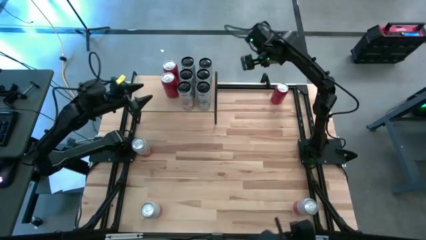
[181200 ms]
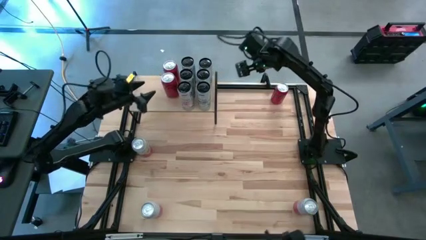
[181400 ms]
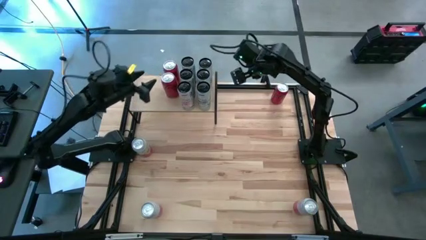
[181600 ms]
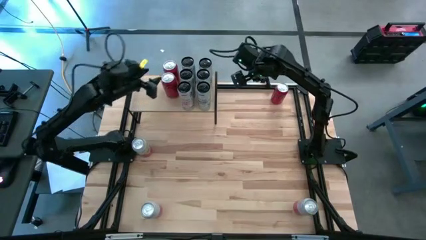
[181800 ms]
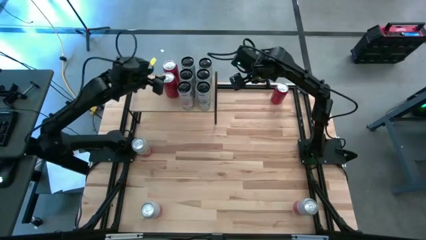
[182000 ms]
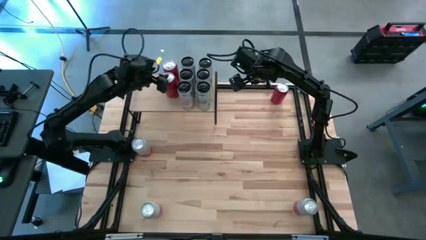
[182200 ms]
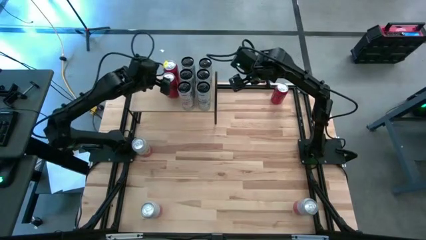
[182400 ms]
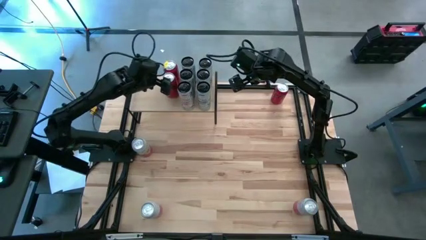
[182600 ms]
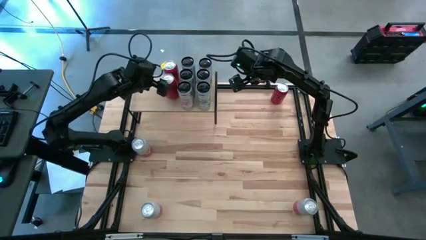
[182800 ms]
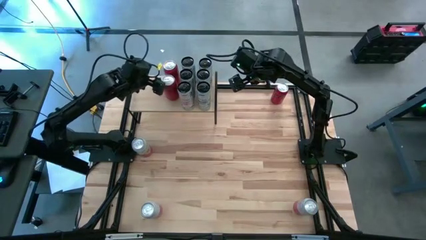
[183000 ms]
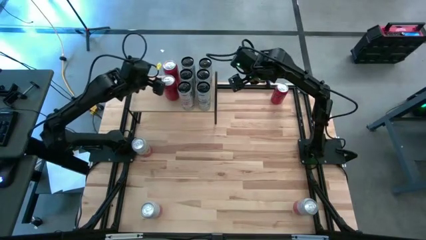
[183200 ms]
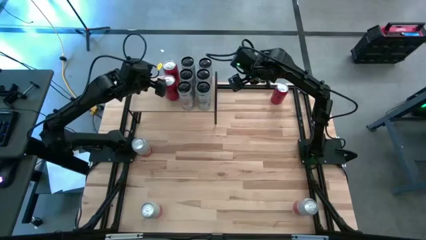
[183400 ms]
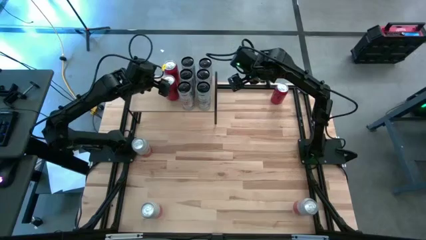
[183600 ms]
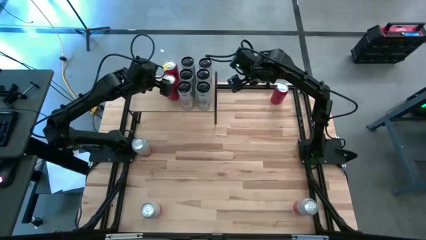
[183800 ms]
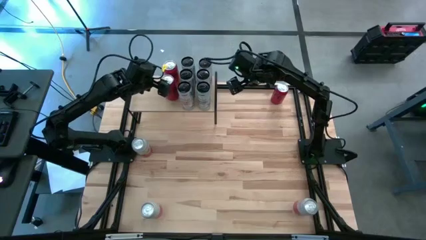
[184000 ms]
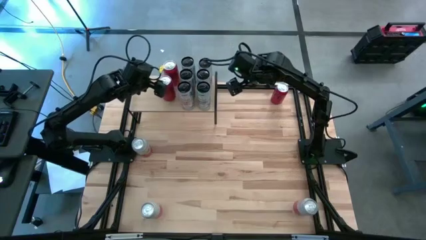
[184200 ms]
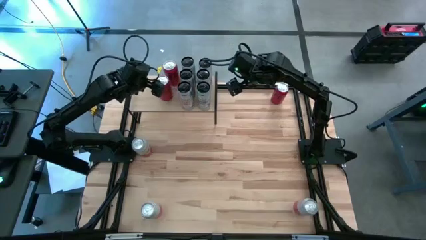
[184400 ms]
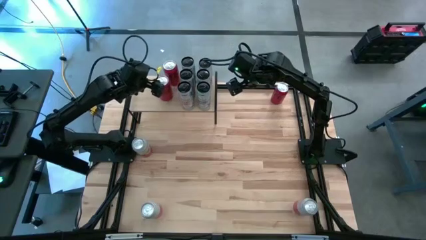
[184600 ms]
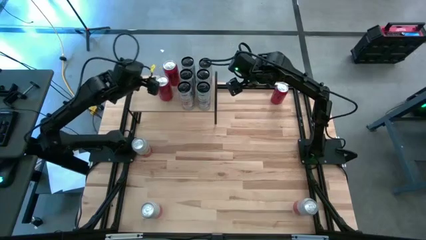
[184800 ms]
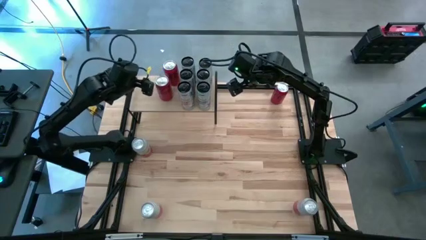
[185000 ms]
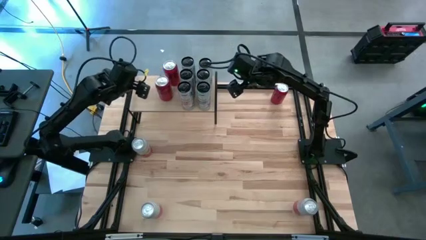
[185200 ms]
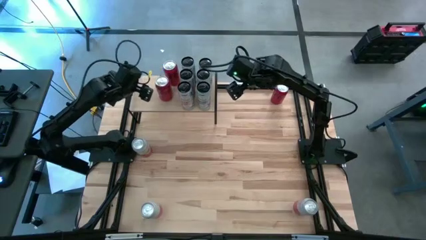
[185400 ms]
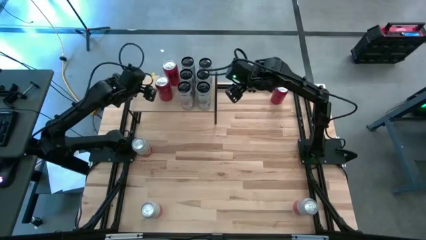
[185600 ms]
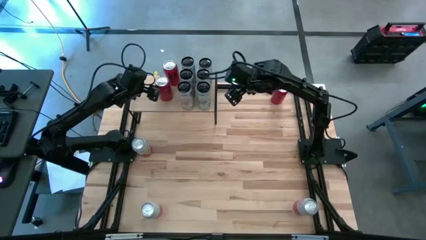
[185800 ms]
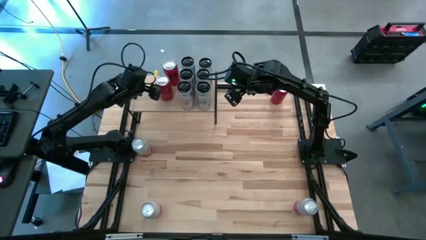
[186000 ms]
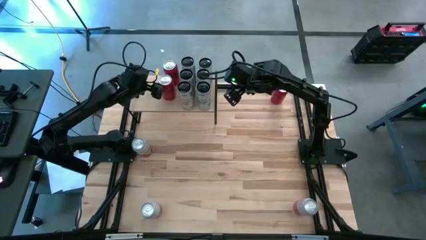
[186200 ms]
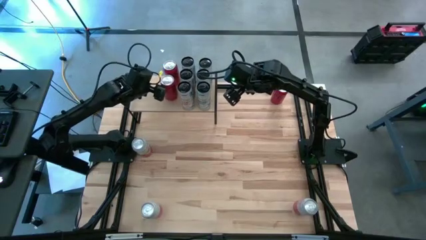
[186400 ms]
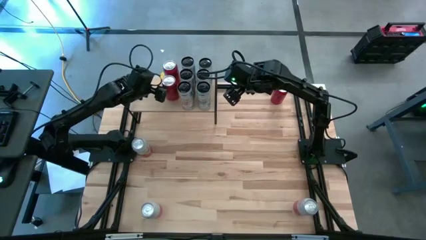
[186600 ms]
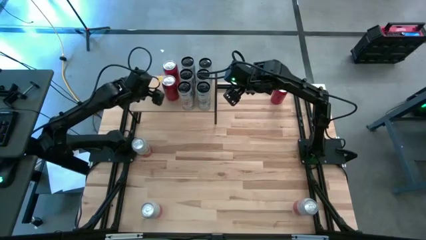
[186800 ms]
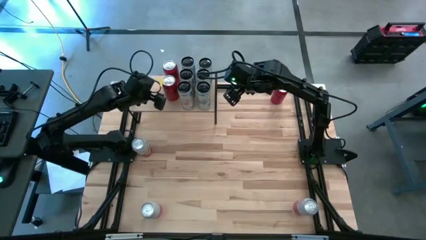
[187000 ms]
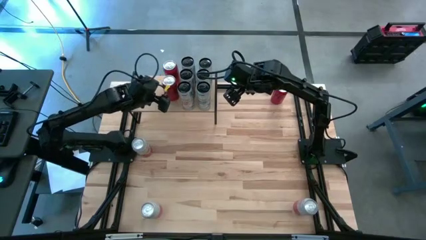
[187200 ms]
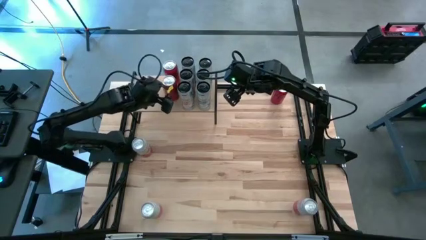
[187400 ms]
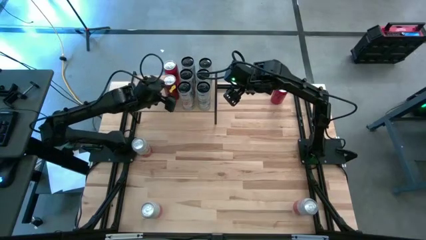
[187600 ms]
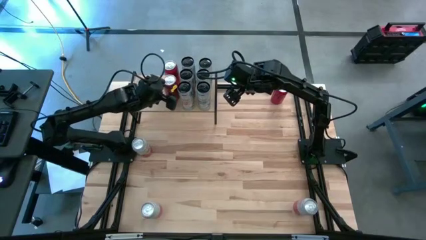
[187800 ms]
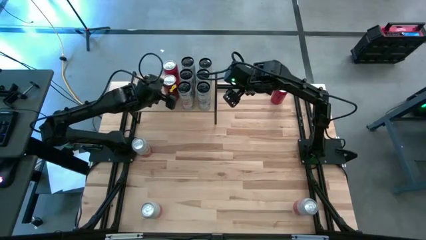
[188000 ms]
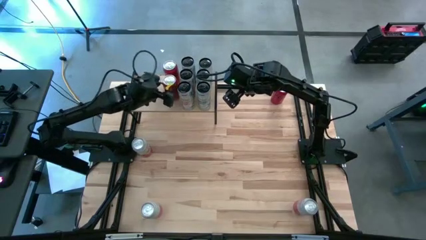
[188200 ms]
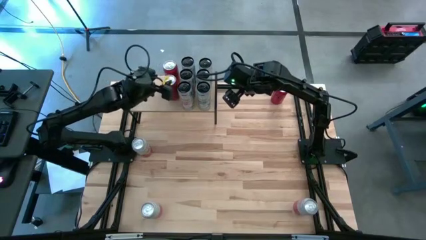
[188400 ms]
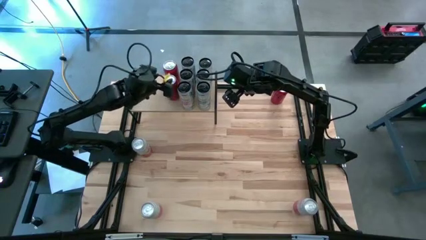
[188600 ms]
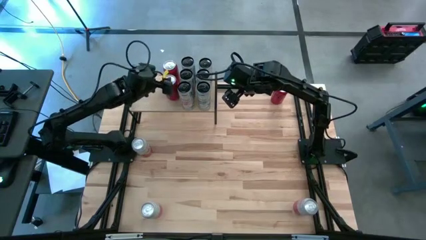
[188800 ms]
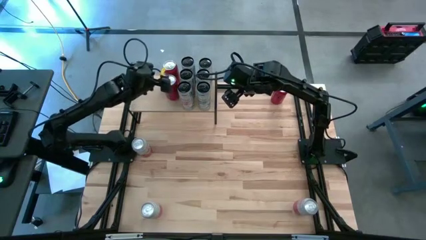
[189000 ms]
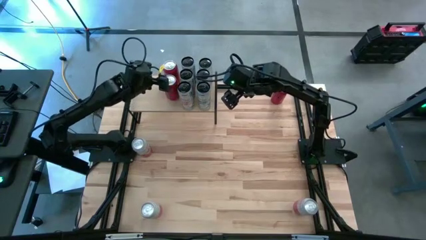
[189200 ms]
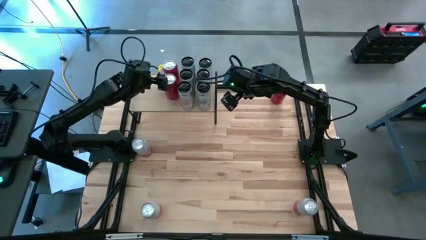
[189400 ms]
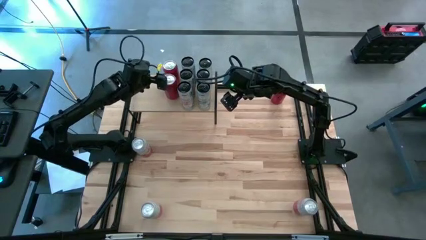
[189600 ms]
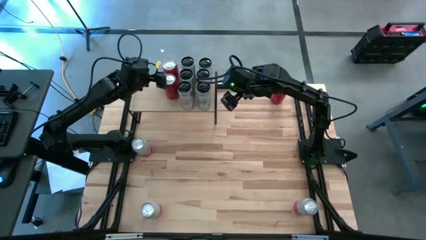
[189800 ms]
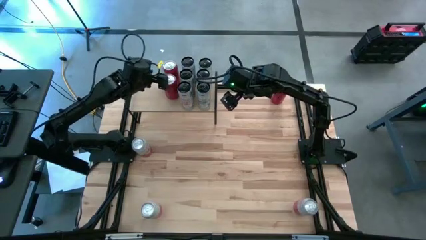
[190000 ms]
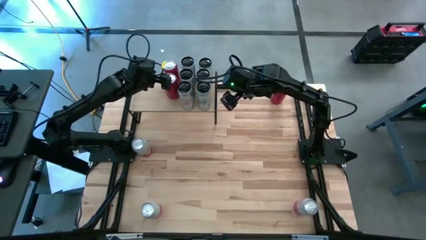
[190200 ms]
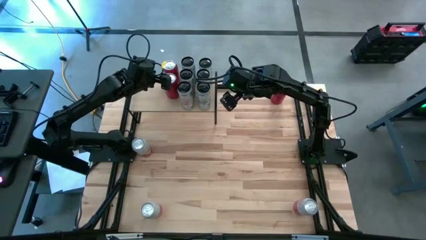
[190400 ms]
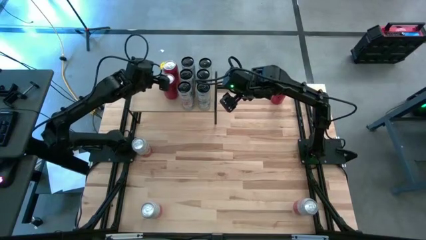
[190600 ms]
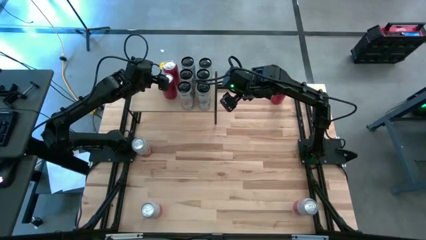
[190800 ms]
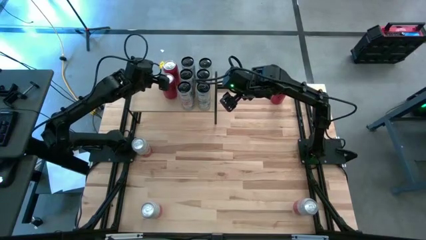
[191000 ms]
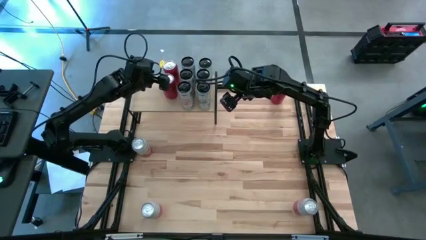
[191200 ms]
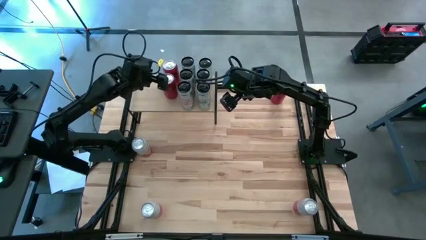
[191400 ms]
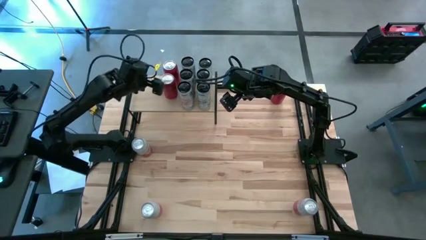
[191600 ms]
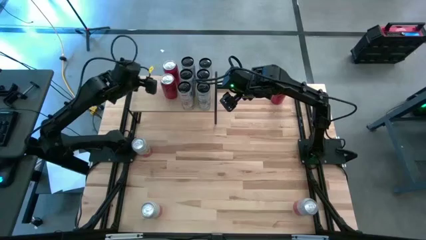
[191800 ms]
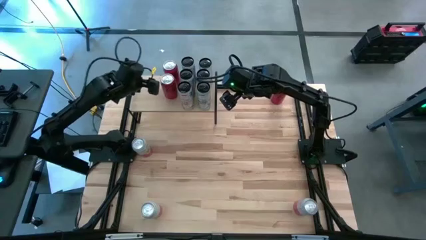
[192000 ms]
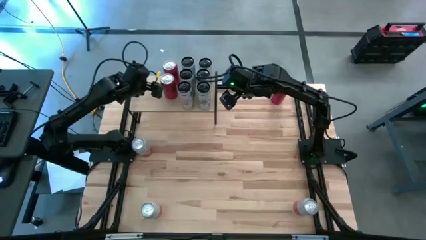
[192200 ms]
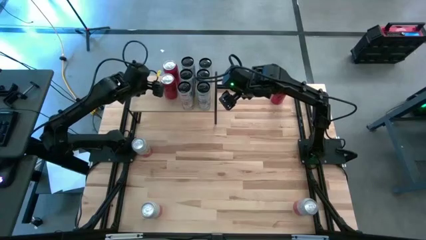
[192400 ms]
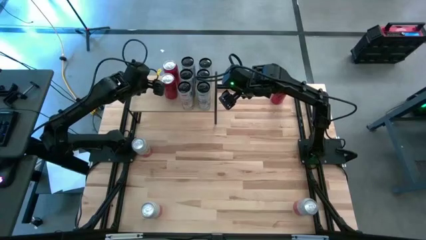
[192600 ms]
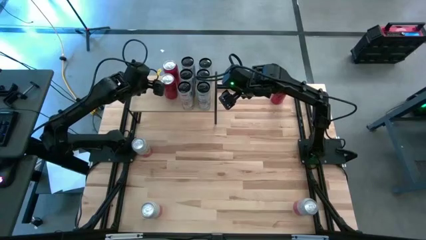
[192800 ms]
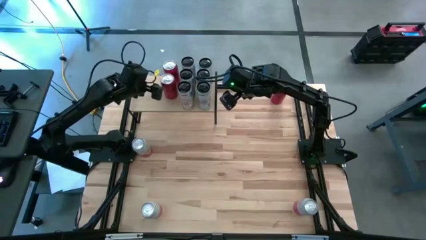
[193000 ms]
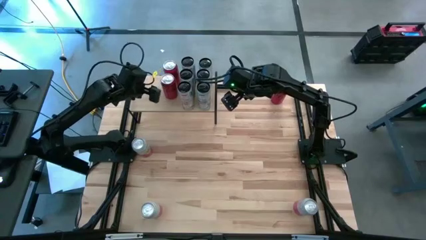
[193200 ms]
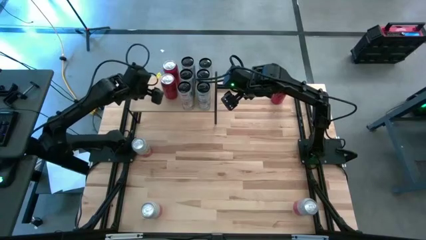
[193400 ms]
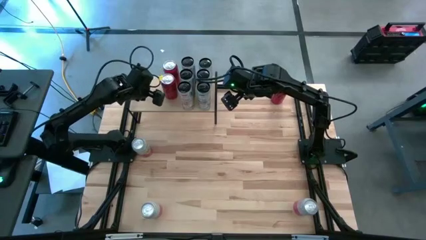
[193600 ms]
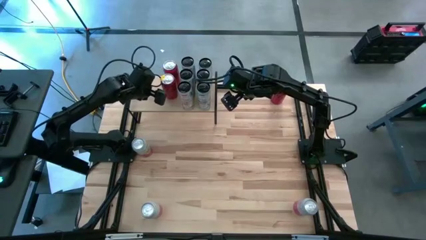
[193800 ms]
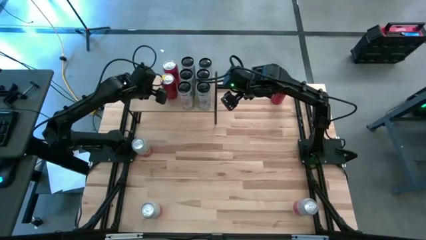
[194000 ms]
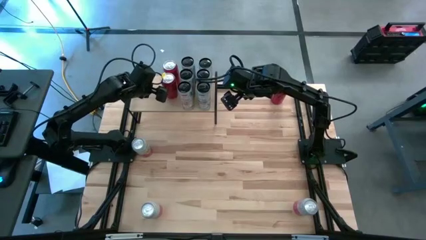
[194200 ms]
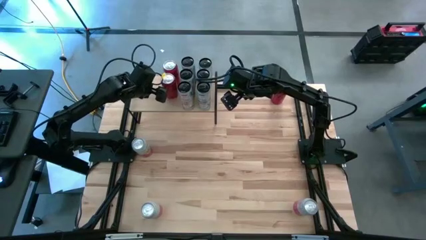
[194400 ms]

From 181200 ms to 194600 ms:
Task: Place canned beverage on shelf
Adjust the aligned red soda cans on the shelf

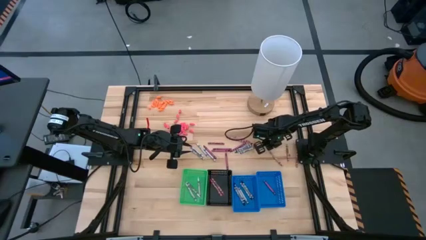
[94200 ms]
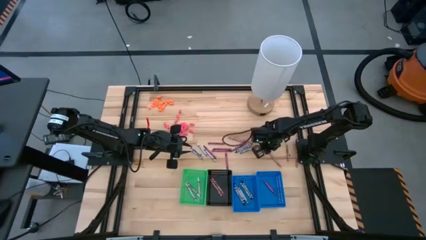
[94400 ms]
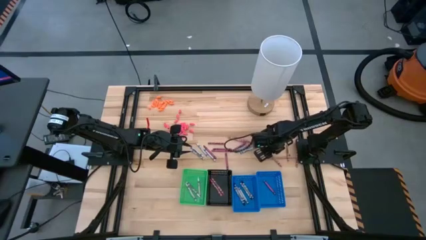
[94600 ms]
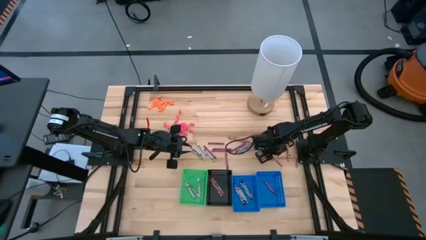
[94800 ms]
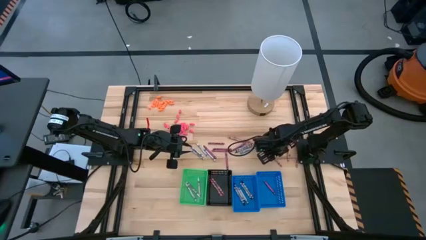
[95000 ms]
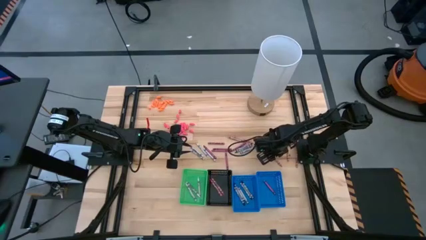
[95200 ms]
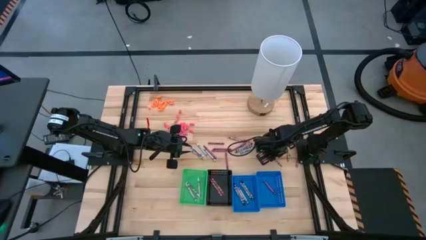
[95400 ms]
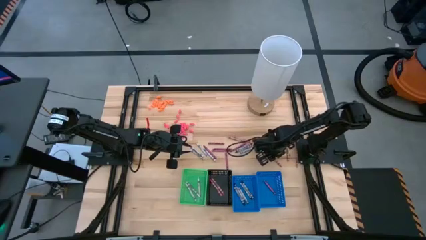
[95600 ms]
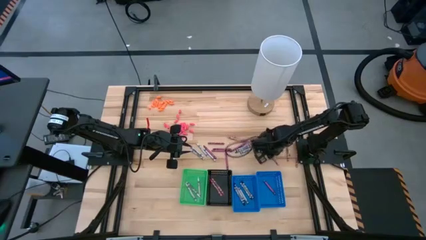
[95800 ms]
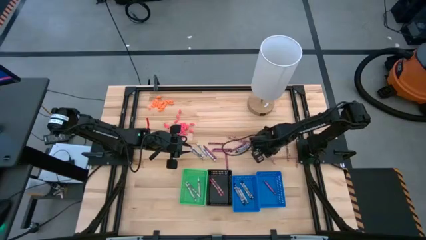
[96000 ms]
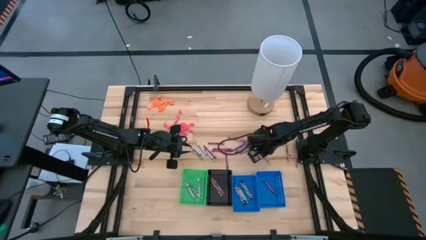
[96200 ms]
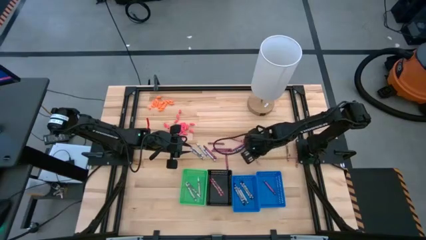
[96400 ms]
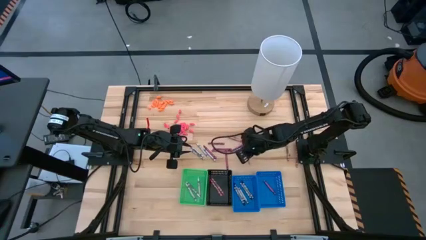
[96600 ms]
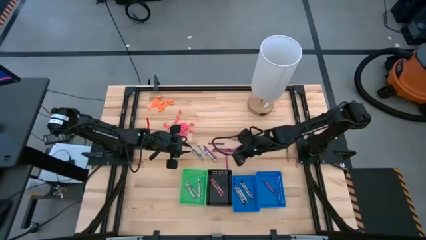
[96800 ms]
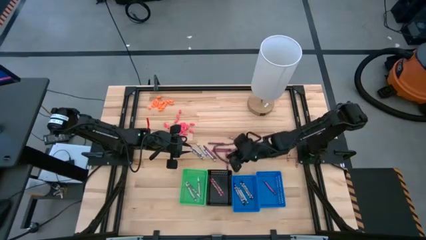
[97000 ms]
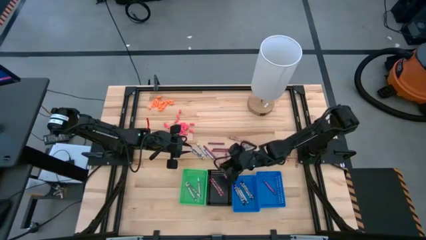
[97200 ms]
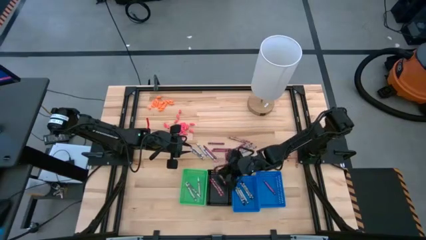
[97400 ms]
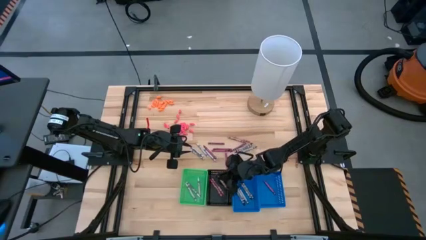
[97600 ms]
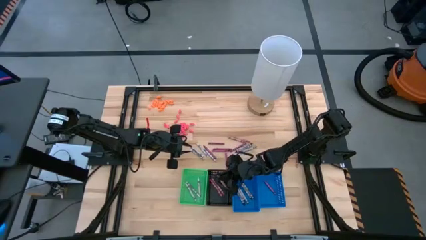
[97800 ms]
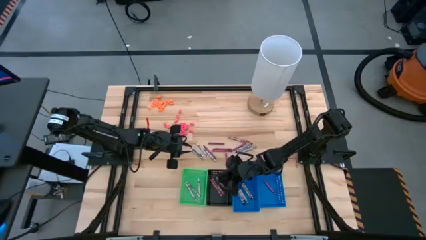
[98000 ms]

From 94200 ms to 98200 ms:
Task: Sort crayons
Put the pink crayon into the black bin
